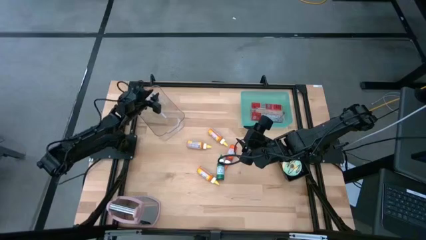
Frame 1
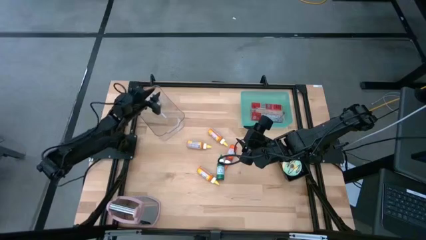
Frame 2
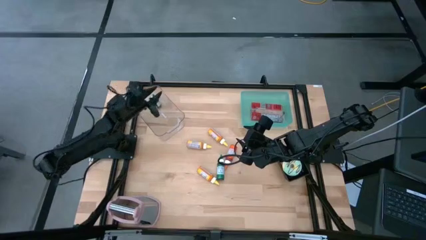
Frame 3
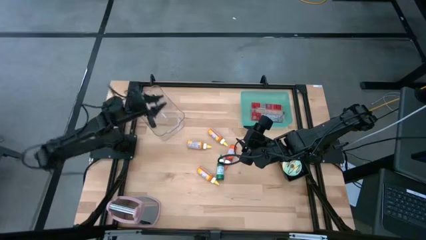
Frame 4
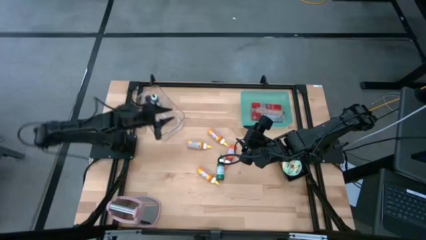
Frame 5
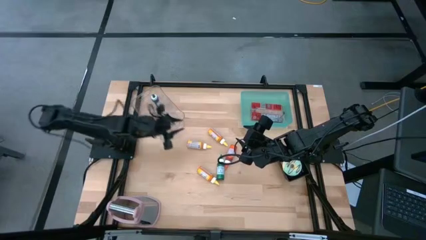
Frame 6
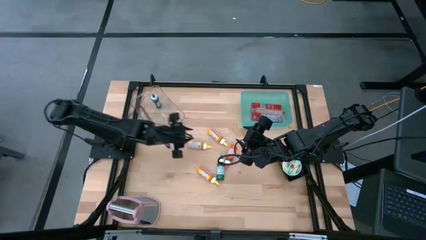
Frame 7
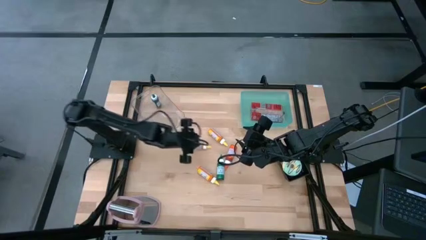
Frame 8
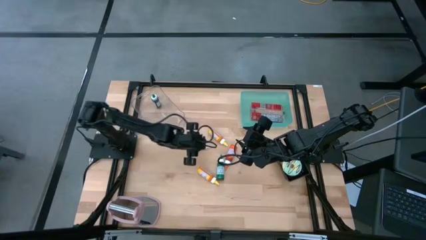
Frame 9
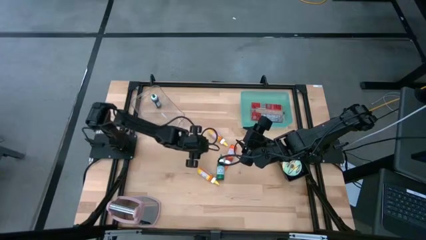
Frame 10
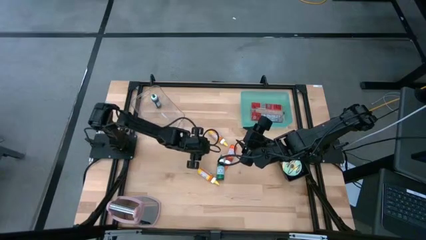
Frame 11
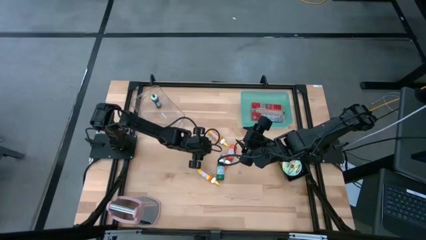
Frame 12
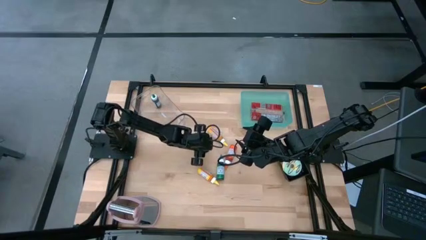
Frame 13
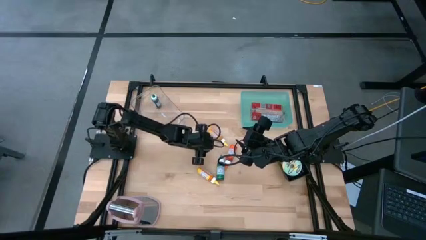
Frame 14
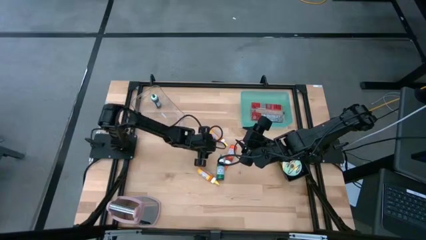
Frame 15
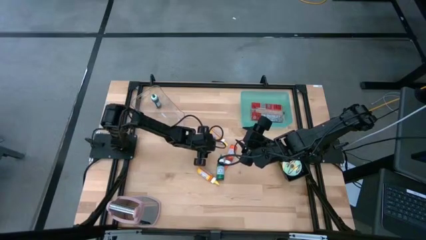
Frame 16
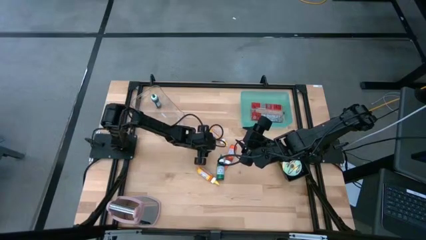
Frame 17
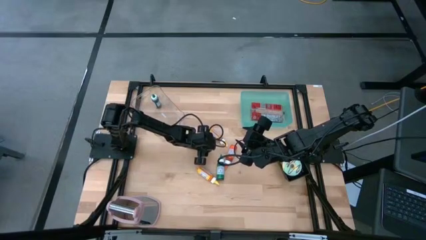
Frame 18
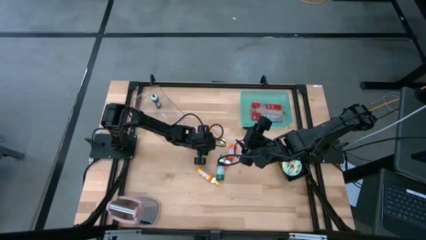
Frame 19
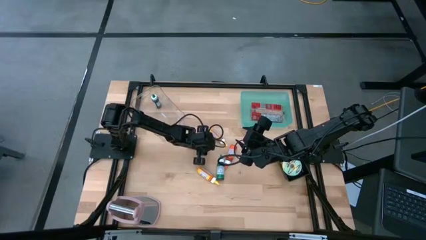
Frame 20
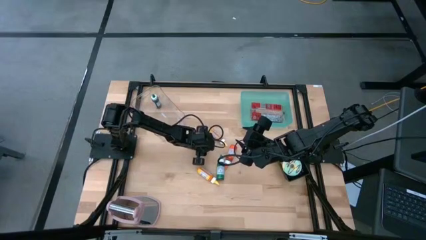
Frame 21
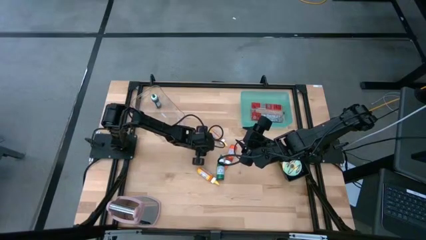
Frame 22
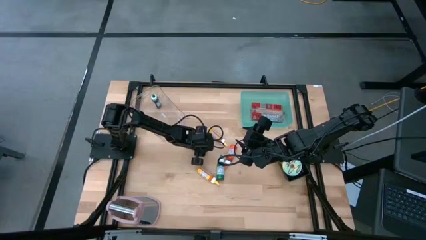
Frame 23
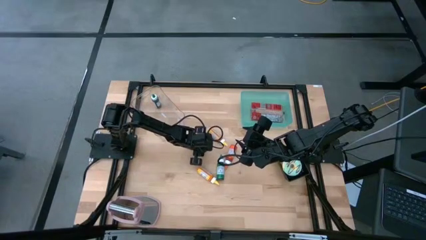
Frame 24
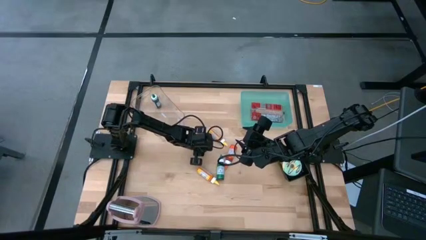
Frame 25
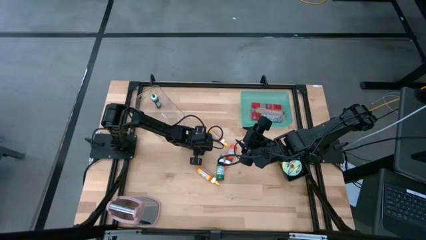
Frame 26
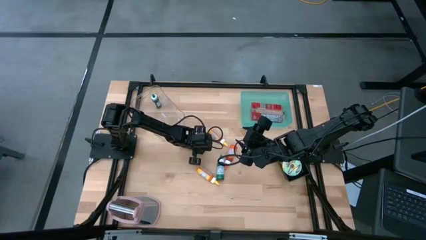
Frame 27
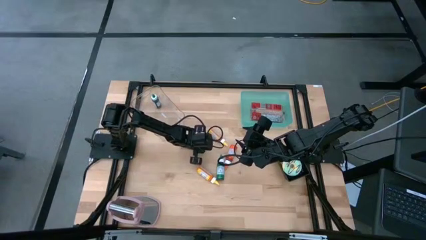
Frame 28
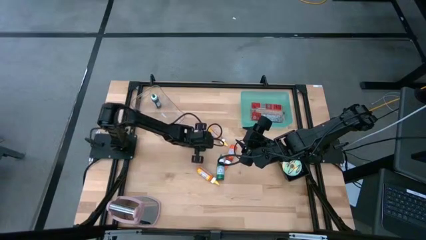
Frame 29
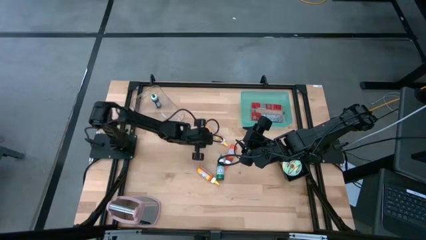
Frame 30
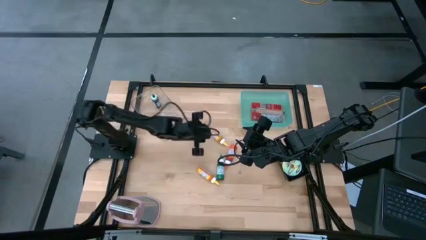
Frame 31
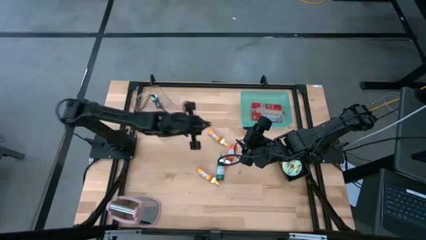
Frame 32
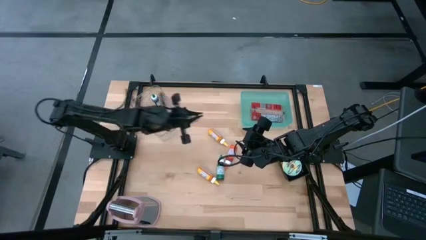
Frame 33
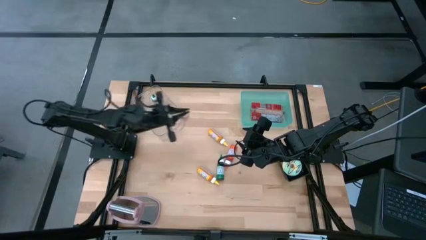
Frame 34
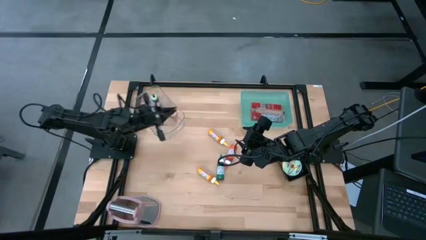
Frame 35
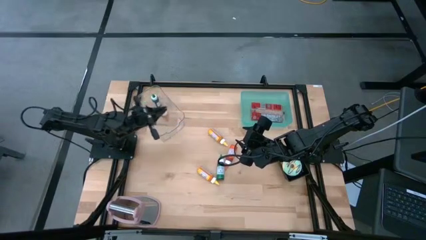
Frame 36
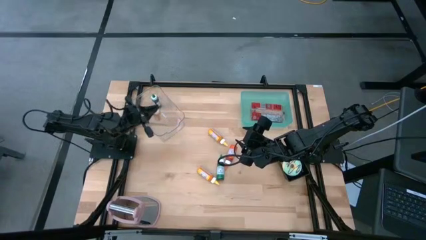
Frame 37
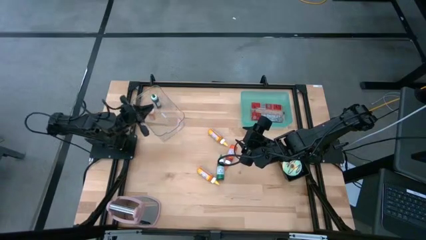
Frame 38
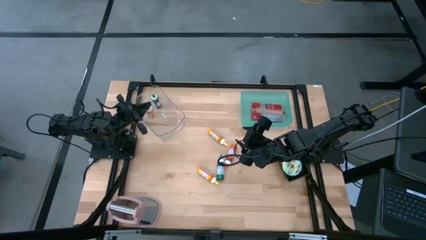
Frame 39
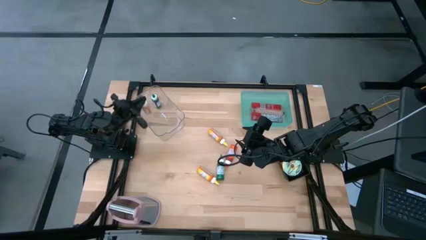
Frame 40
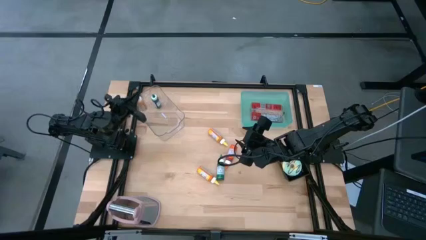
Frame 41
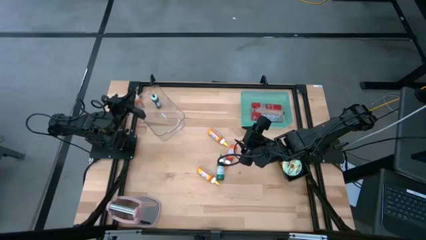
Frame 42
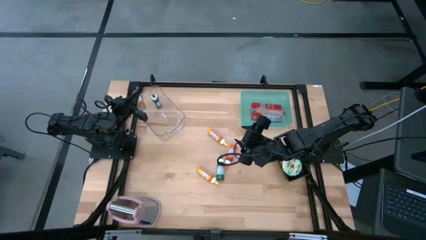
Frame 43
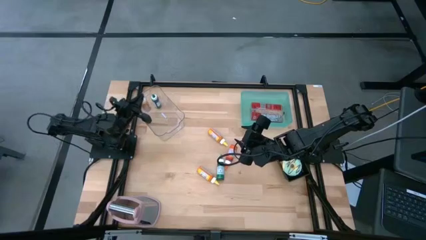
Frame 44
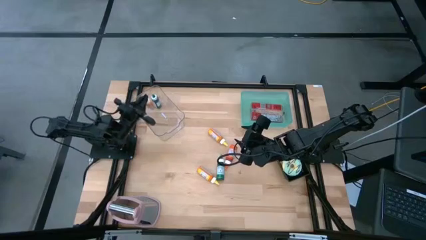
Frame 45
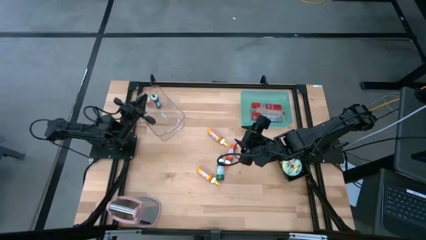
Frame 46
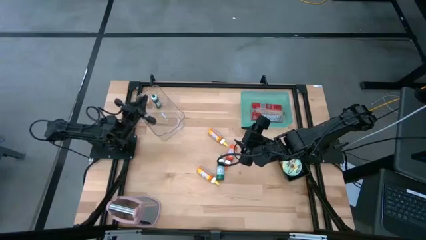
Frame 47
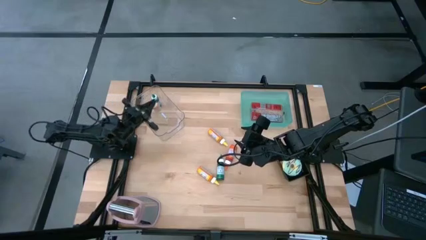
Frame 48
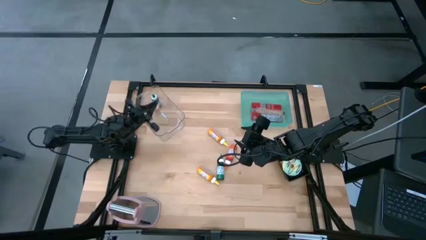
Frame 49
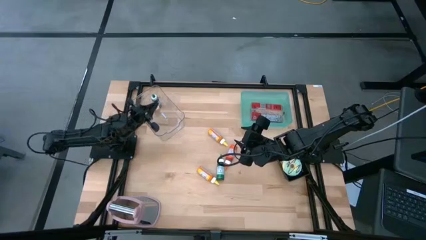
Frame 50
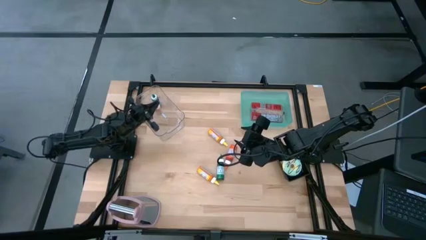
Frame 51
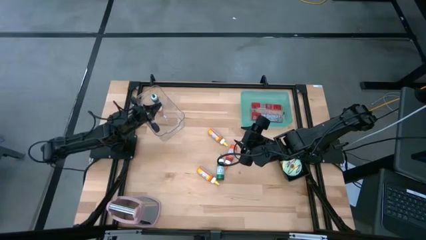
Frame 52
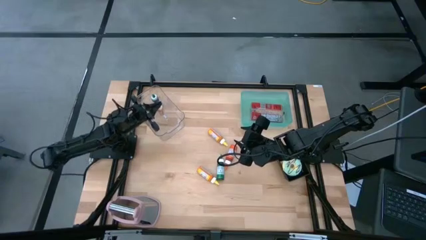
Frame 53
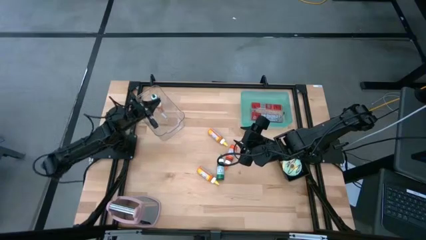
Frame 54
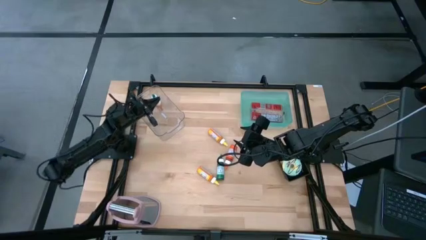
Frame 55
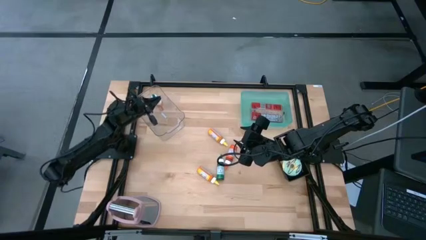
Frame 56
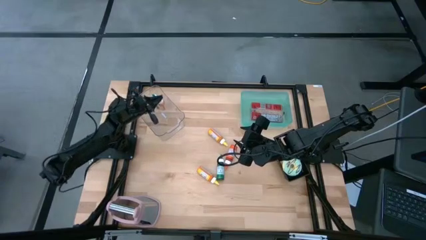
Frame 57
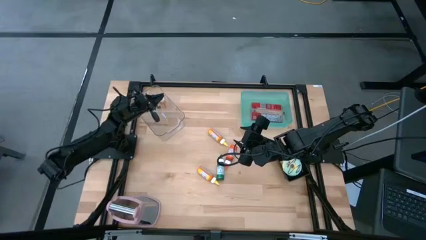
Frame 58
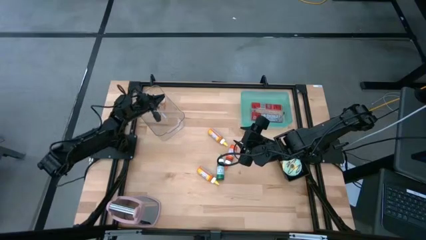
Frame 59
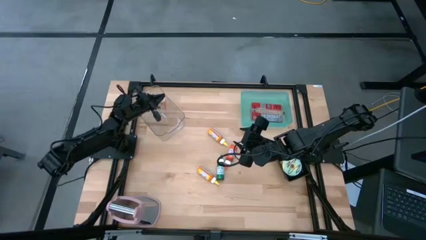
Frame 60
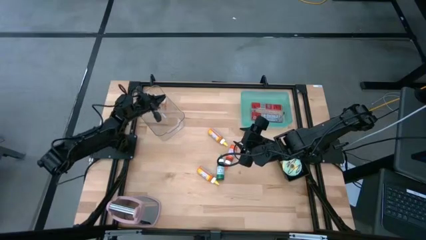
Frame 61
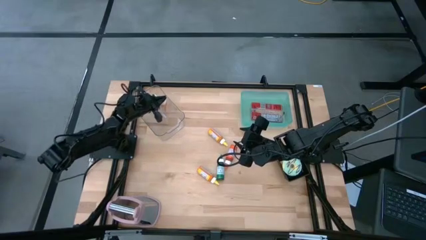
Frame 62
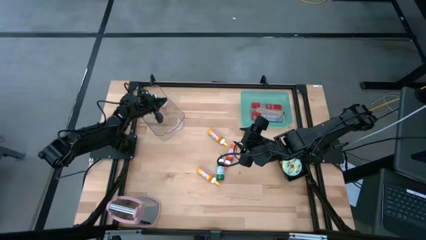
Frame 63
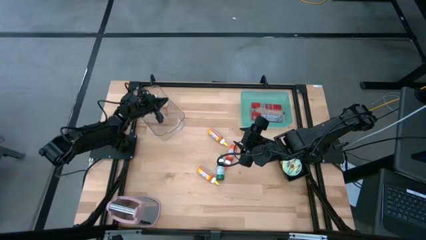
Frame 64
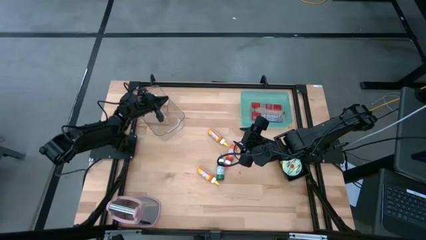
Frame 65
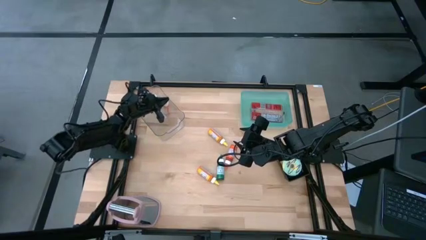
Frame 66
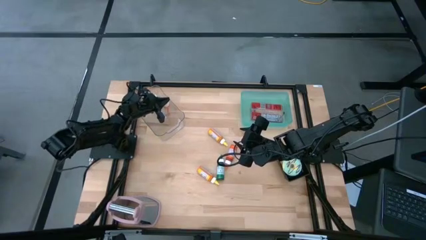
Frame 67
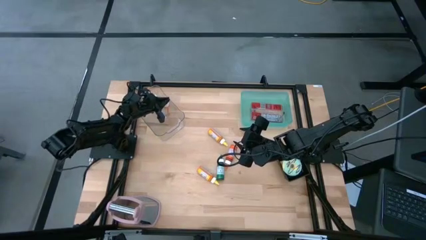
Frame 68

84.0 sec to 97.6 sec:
Put the middle yellow food coloring bottle into the transparent bin

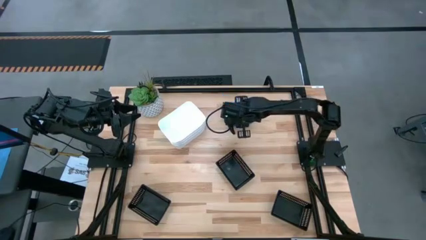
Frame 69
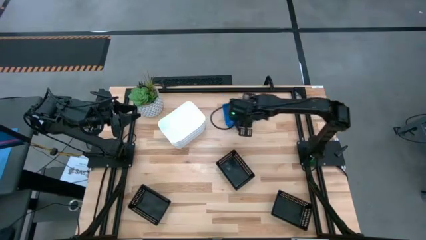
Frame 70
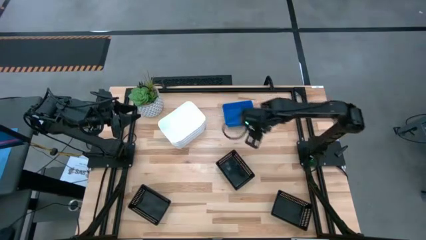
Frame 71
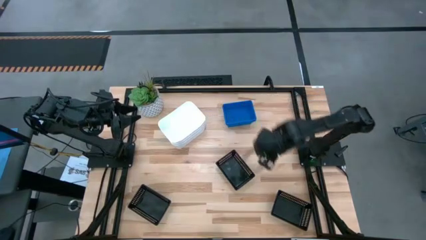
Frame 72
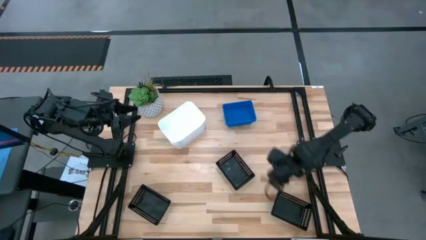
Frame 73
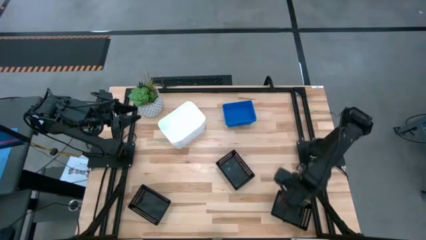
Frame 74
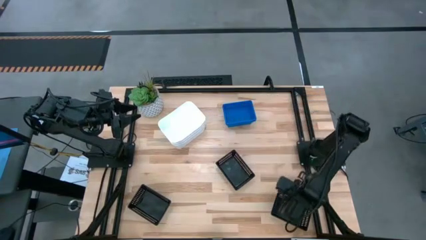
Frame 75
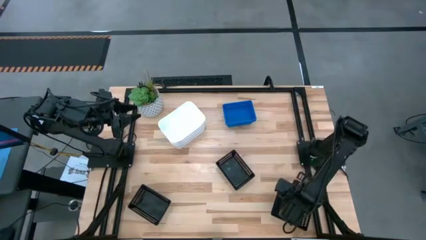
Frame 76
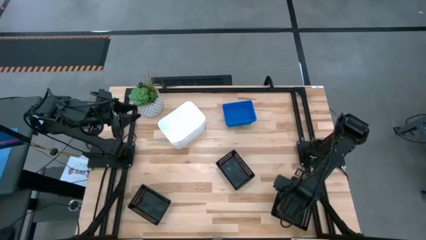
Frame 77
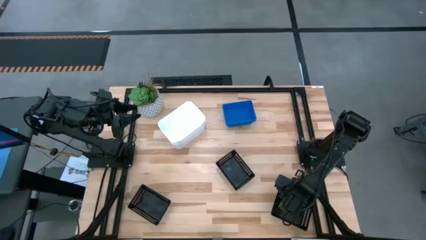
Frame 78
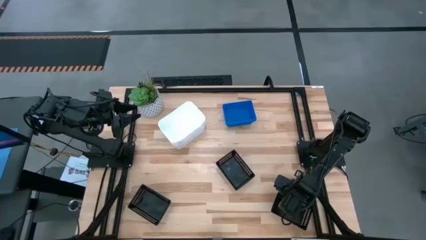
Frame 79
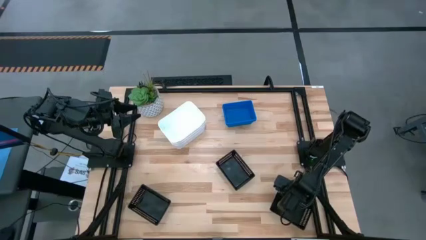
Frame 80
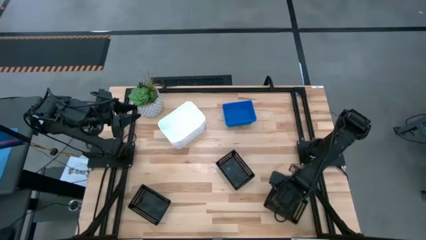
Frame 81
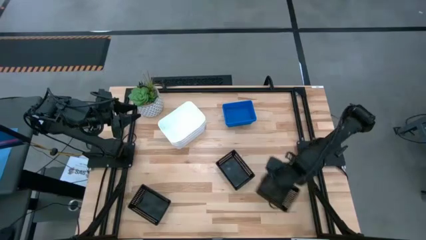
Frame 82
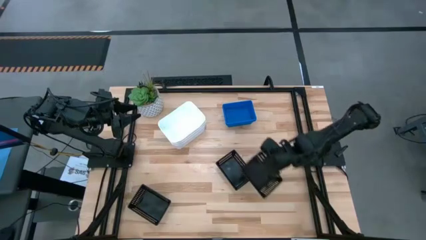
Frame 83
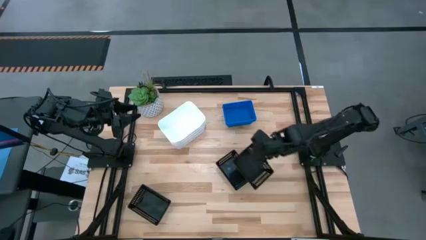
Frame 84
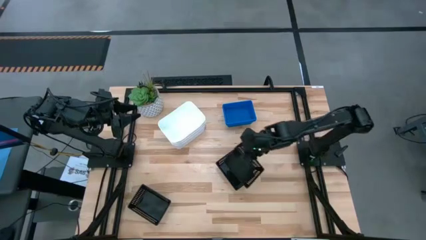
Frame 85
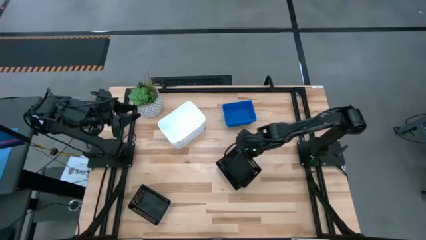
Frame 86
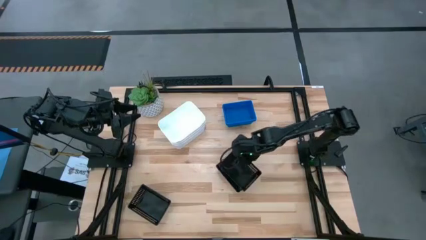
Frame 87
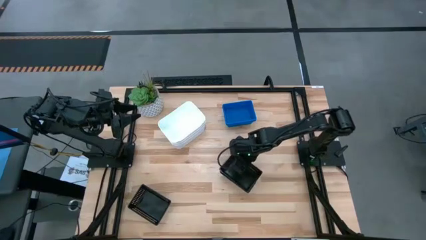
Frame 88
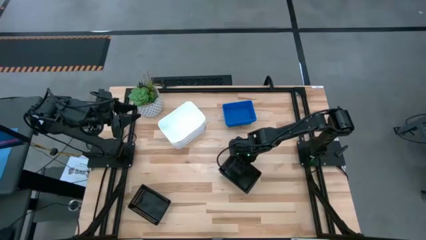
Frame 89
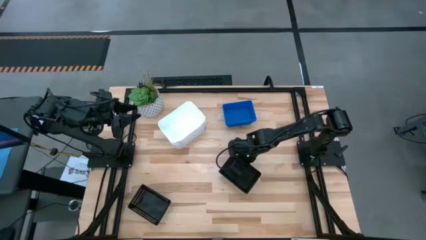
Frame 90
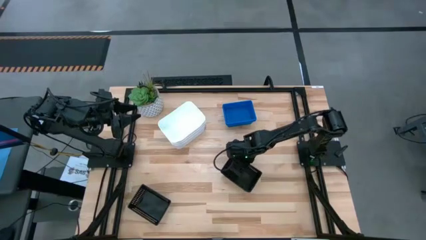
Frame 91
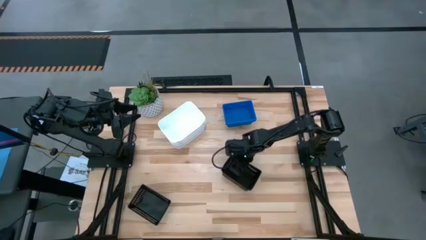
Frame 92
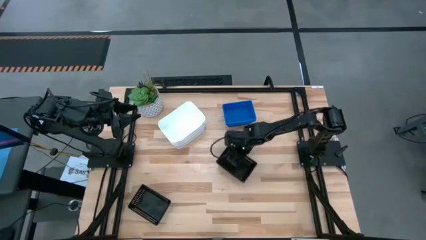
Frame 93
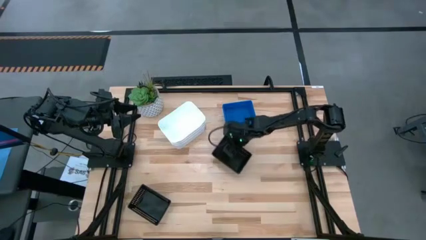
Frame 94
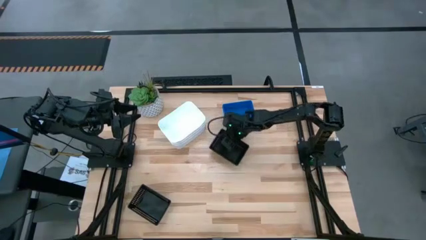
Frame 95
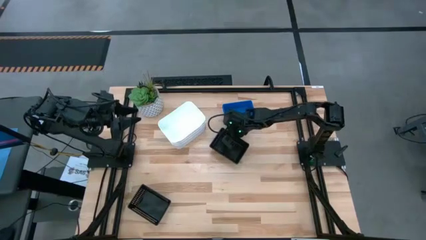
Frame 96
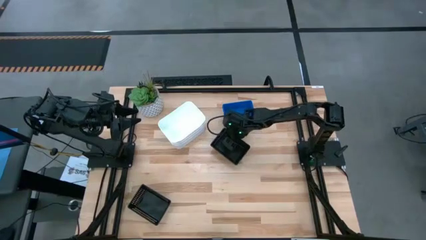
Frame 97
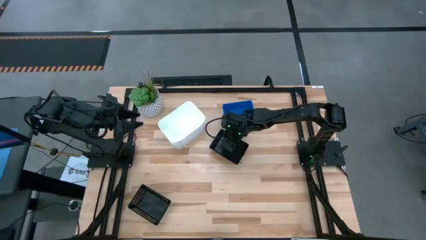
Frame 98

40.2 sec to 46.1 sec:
Stack the bottom right black bin on the top black bin
